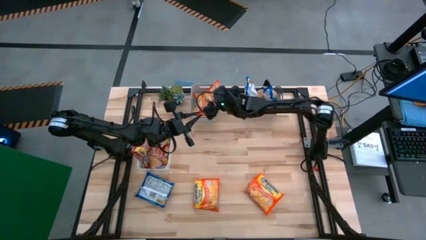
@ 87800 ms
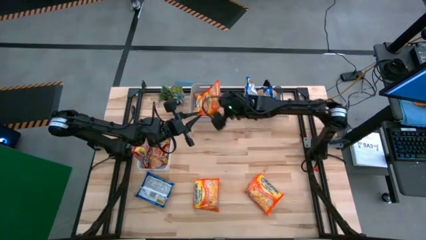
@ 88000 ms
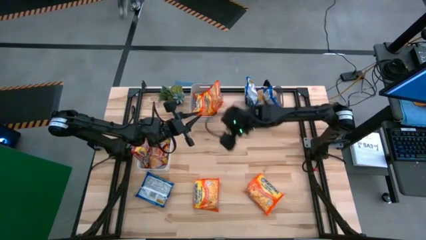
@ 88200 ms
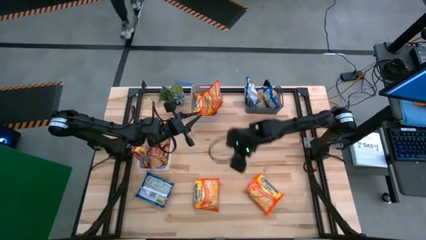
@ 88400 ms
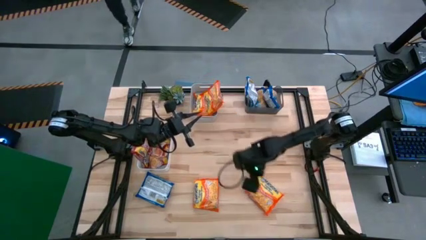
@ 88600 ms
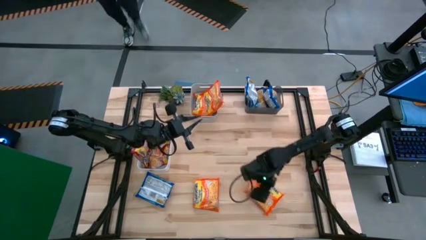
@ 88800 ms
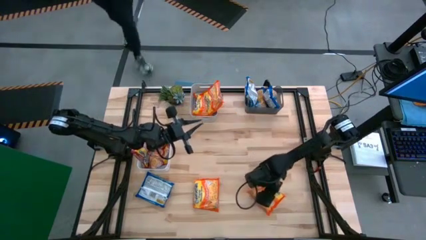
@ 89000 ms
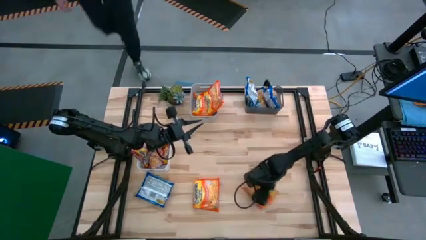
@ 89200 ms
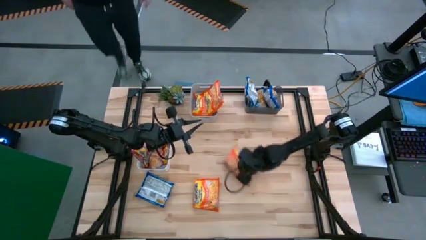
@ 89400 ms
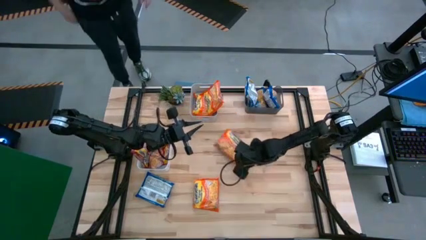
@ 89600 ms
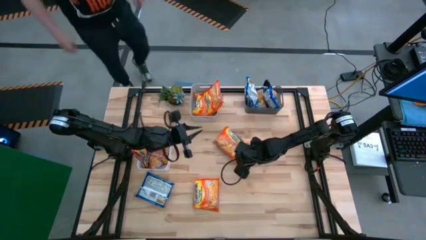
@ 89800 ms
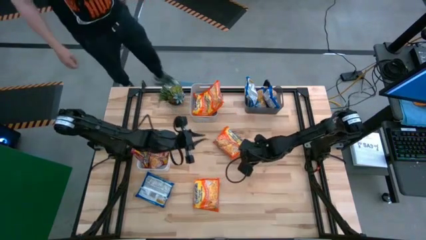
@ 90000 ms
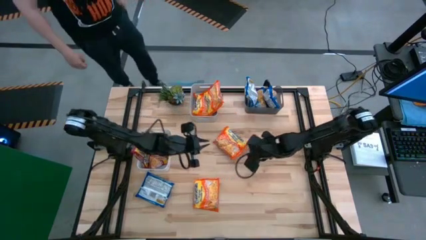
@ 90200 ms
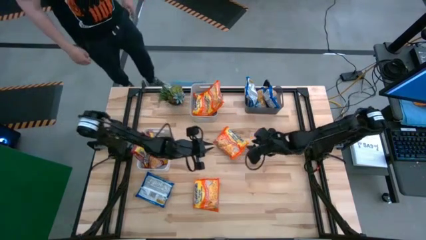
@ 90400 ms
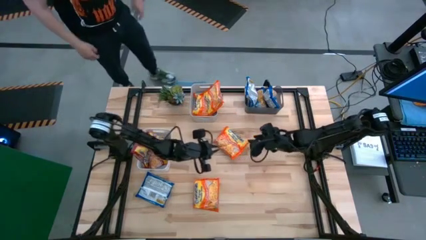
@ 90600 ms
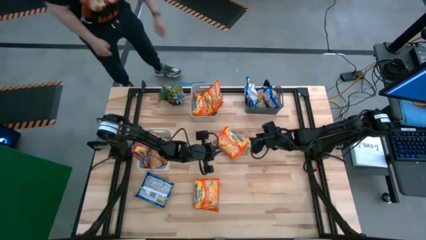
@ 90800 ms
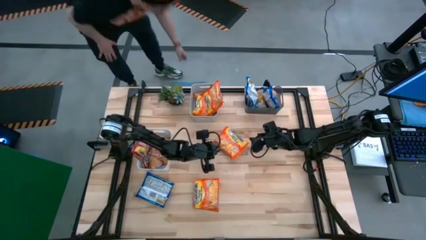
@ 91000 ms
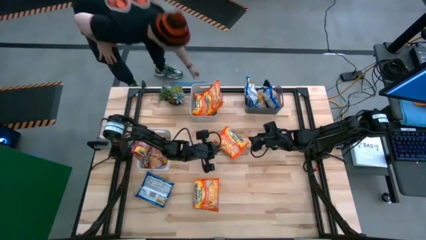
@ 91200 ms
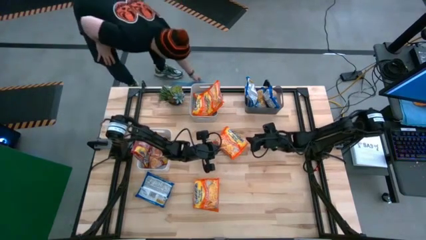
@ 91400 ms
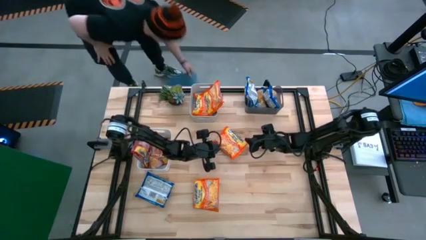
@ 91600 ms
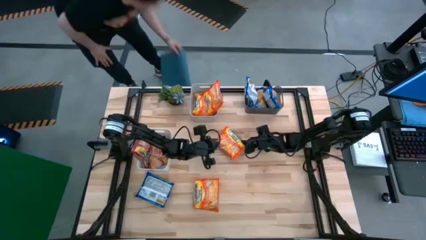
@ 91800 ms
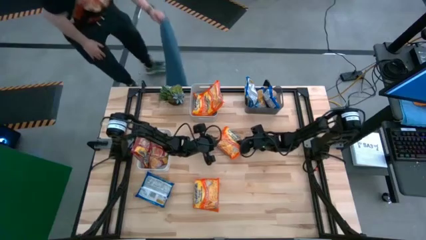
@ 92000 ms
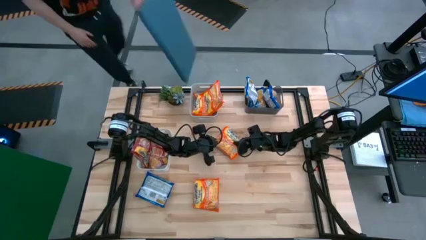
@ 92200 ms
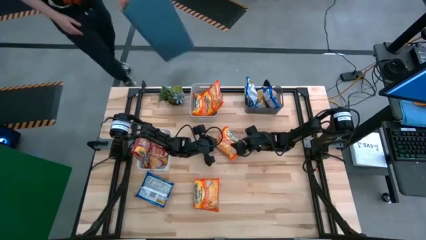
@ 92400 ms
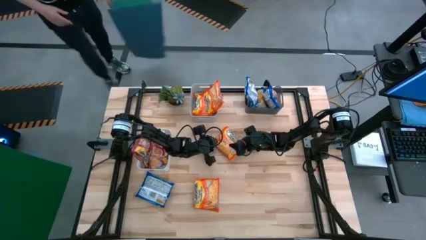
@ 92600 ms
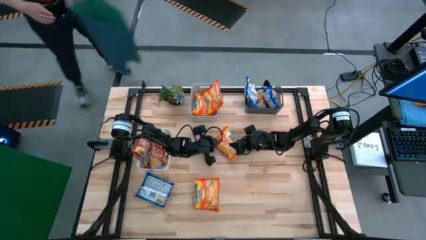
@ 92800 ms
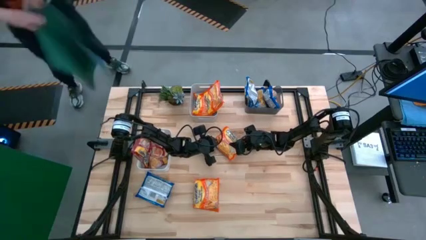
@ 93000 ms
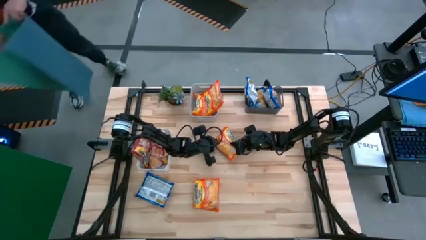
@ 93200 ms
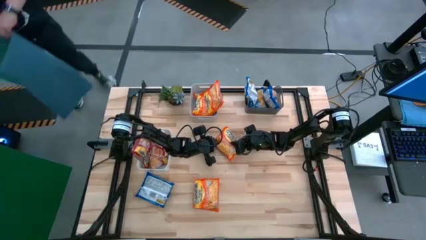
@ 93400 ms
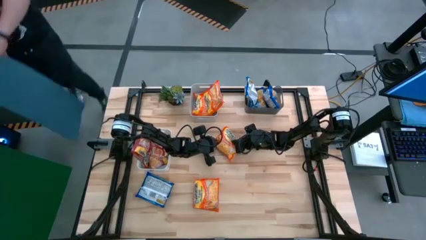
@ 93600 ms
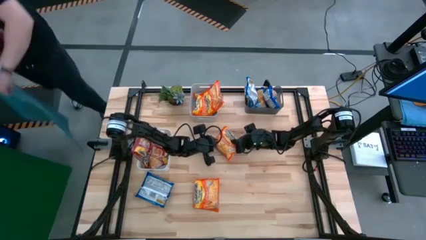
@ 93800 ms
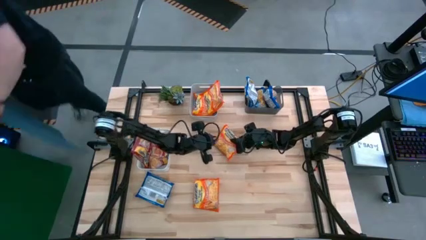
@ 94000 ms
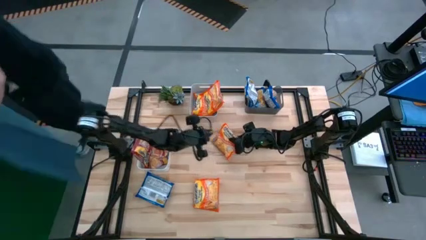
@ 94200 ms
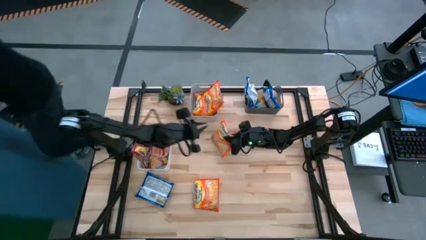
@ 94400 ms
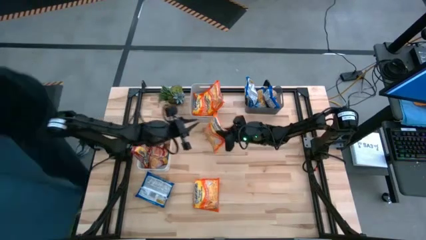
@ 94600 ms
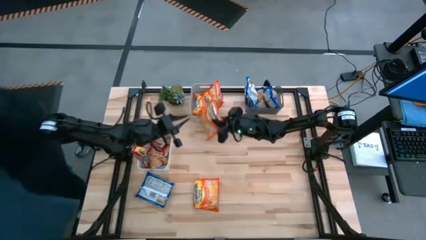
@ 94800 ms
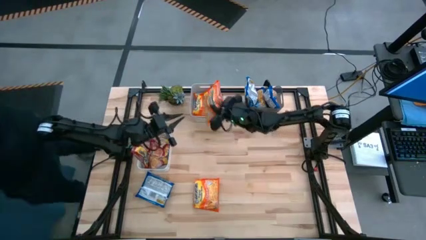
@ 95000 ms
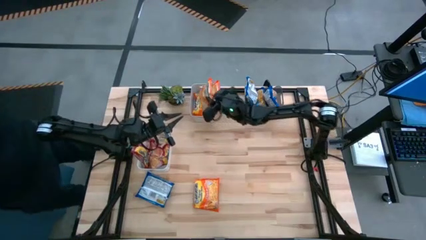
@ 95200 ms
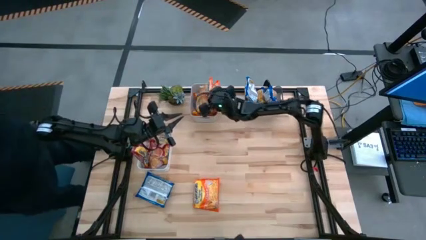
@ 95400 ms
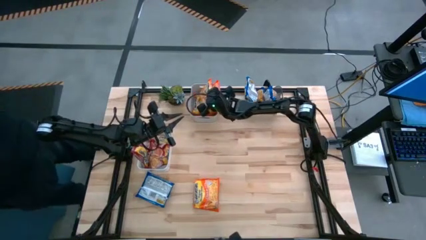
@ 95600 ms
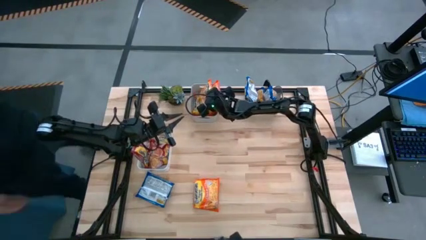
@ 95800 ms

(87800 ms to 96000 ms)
Task: Sort Maruchan noodles
Put the orange noodle pack into the gray bin

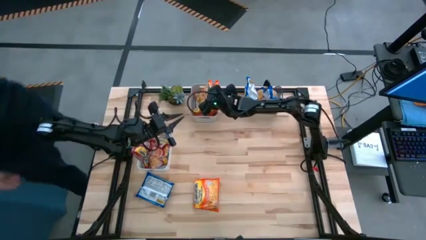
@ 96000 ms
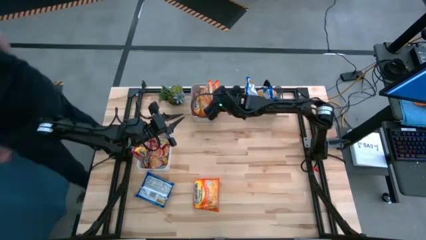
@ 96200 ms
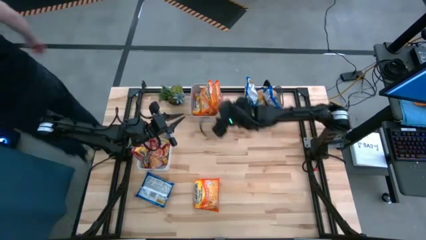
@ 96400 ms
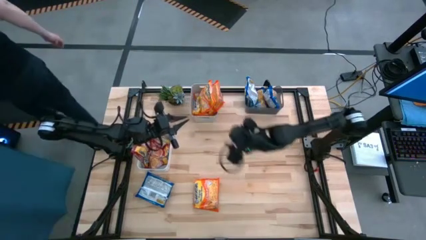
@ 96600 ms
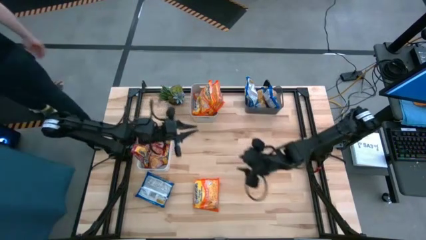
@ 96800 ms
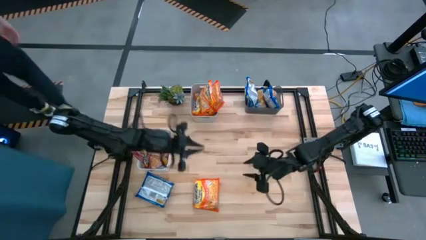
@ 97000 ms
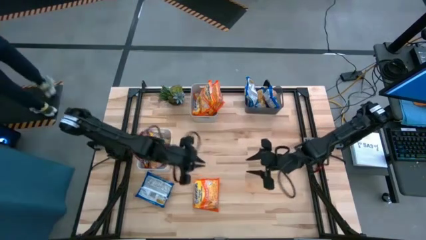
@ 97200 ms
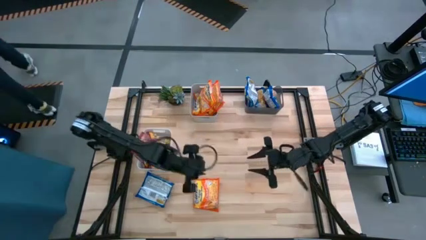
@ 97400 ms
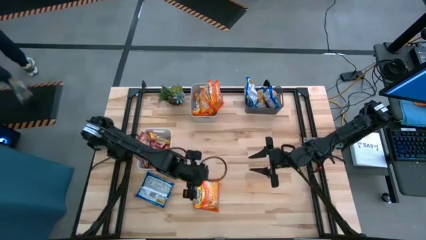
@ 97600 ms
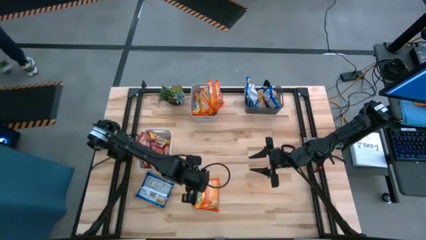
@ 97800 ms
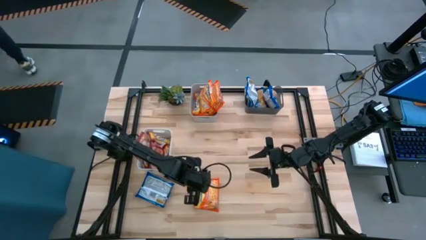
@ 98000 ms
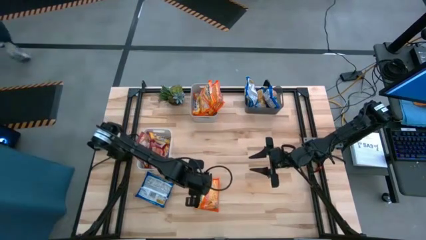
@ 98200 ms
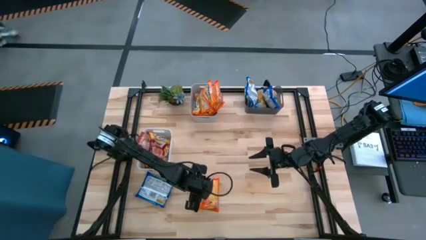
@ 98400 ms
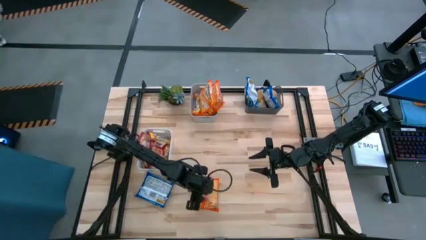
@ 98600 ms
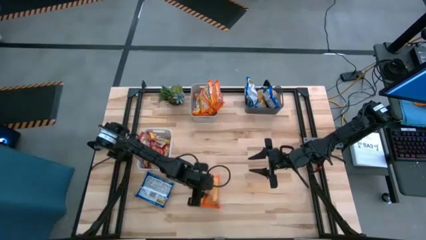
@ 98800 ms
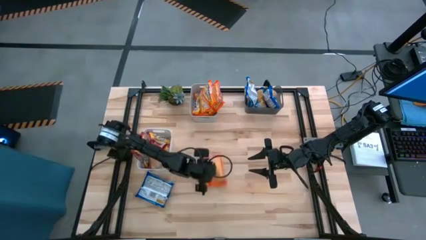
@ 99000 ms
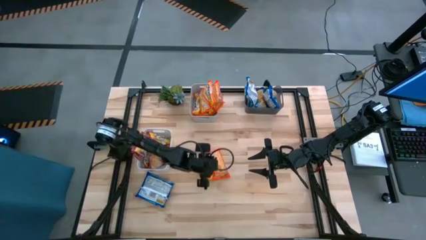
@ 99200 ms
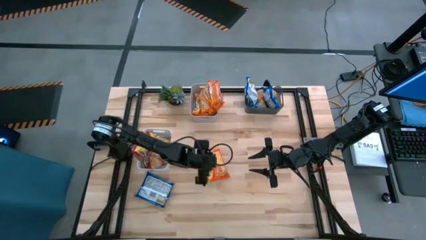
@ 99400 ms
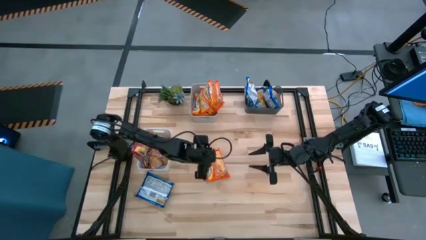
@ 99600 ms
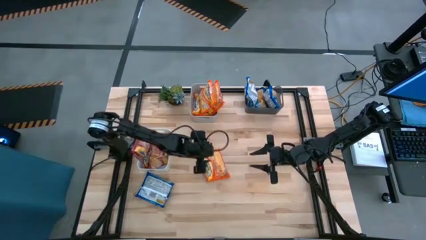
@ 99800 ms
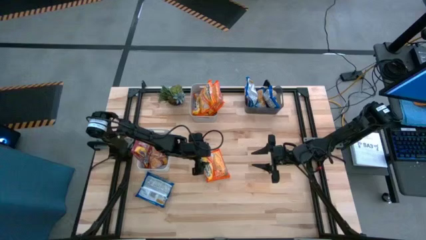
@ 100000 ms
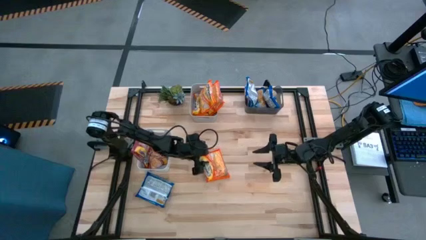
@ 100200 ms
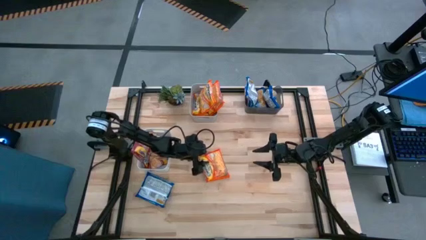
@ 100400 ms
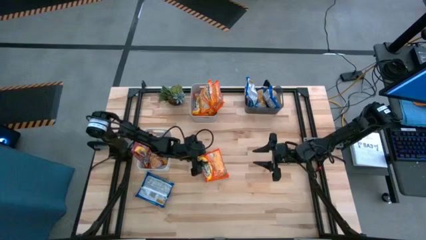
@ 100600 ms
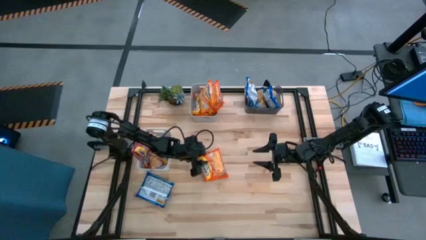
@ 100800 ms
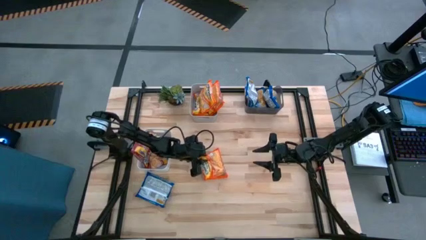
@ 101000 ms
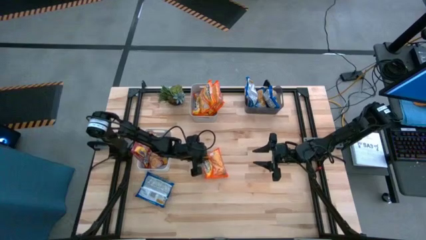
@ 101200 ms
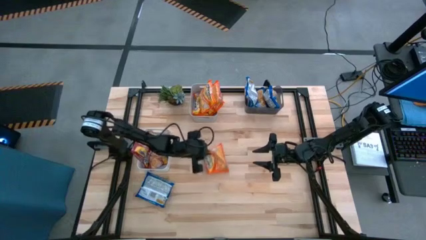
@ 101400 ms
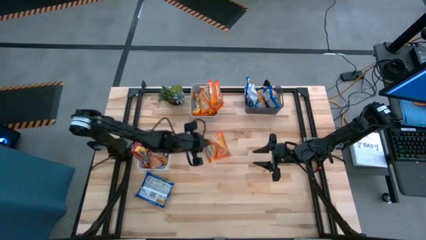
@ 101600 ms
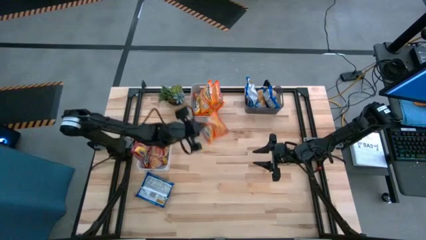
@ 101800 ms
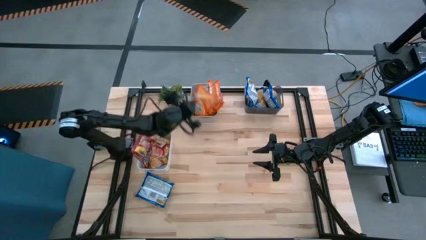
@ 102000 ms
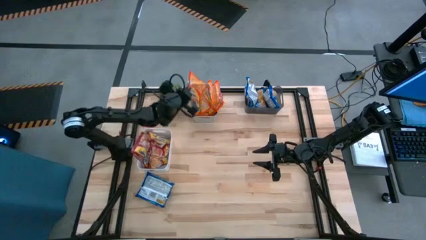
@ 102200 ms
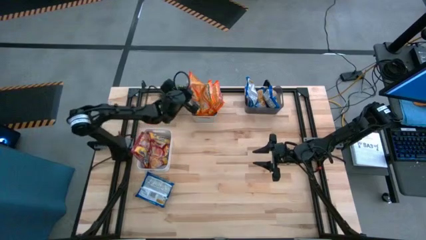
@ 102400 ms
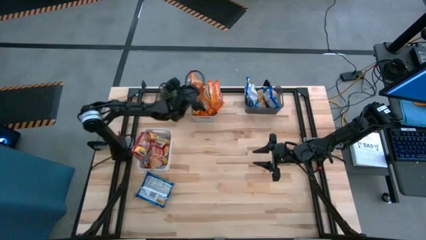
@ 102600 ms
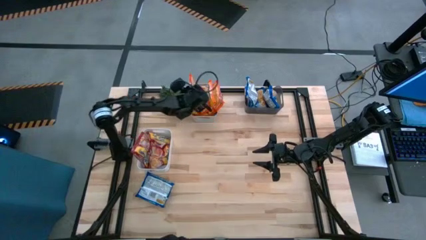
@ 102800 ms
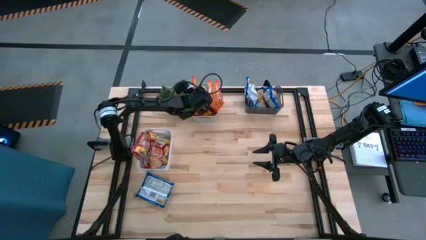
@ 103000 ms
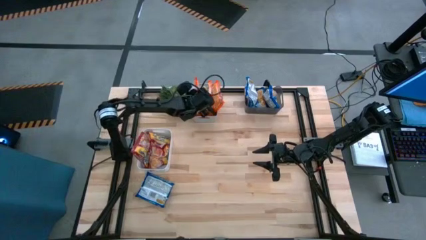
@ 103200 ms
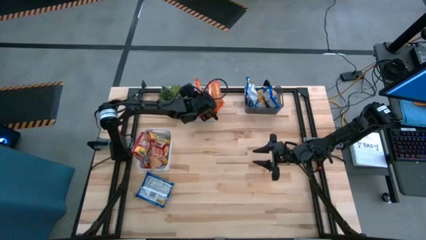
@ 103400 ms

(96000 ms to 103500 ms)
Put the orange noodle pack into the gray bin
